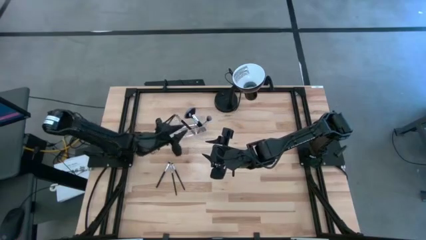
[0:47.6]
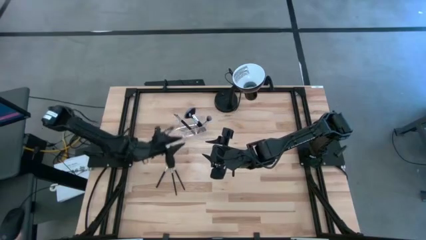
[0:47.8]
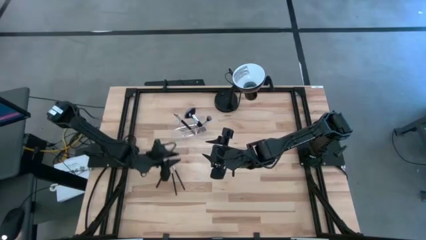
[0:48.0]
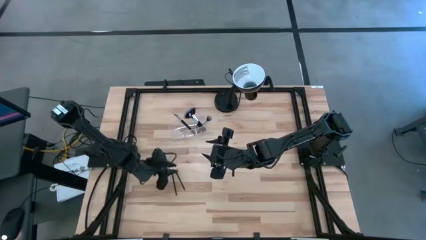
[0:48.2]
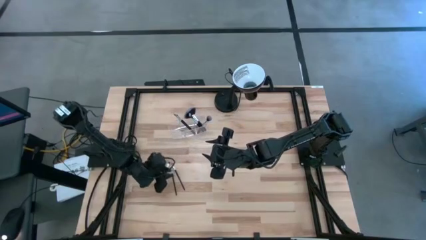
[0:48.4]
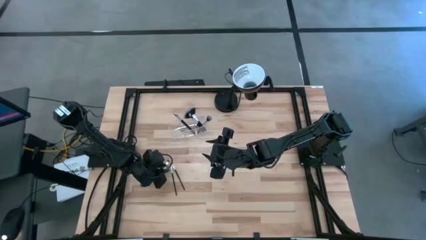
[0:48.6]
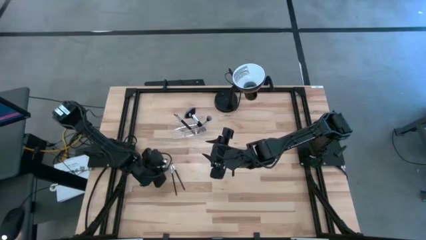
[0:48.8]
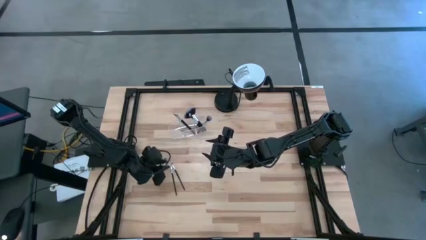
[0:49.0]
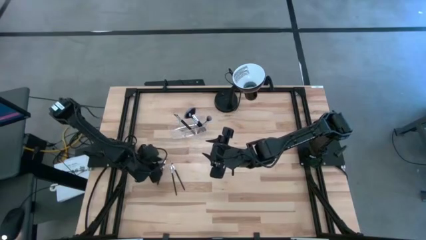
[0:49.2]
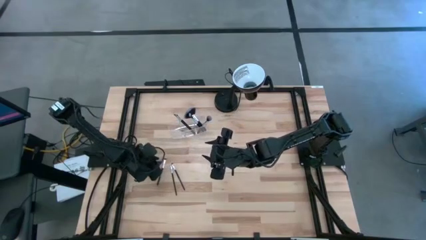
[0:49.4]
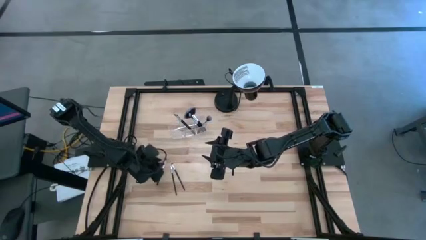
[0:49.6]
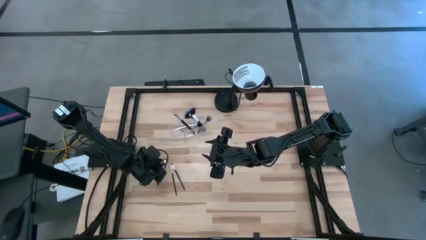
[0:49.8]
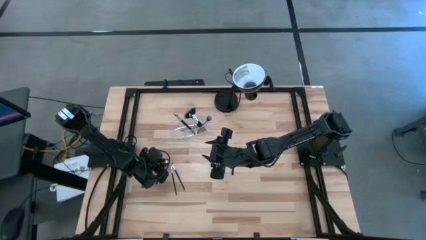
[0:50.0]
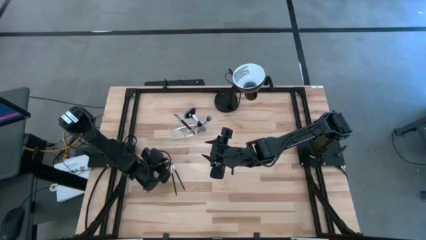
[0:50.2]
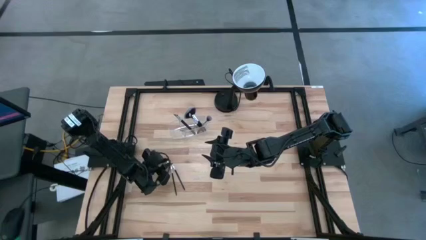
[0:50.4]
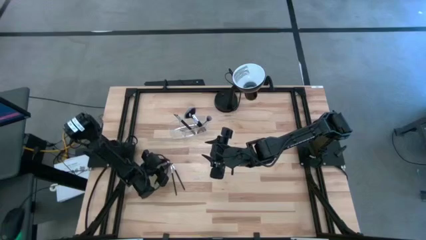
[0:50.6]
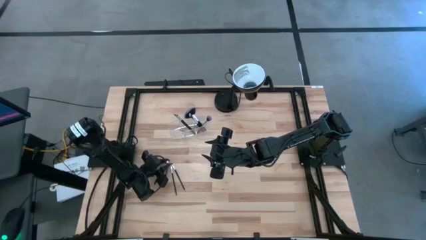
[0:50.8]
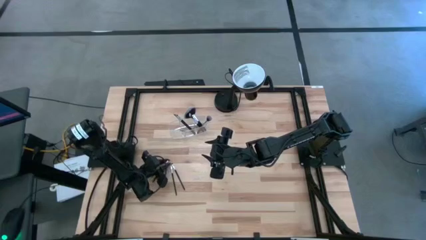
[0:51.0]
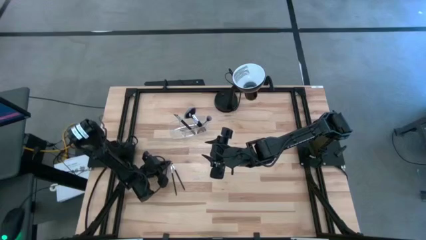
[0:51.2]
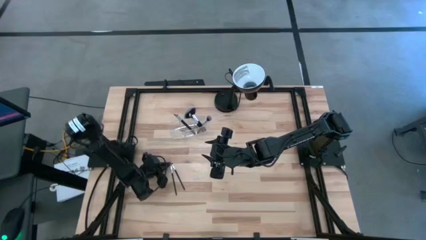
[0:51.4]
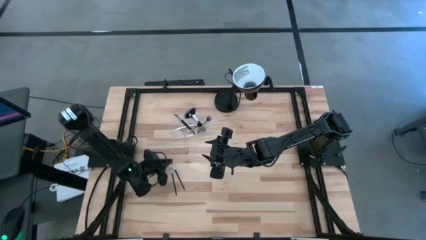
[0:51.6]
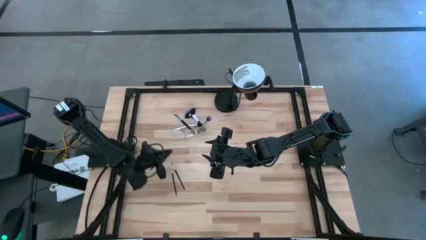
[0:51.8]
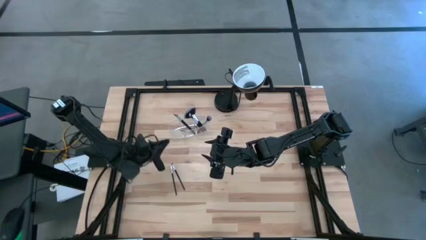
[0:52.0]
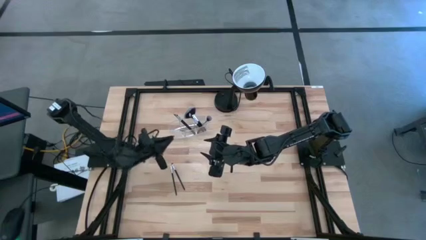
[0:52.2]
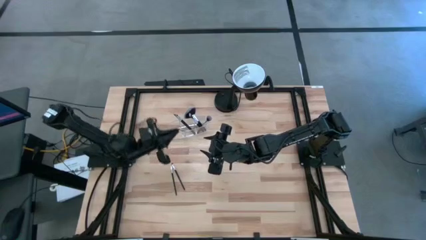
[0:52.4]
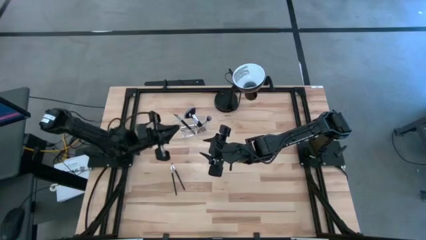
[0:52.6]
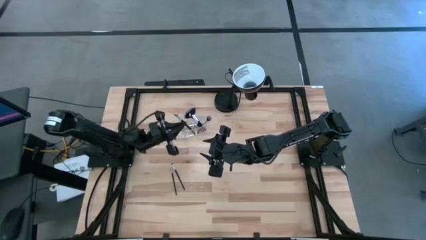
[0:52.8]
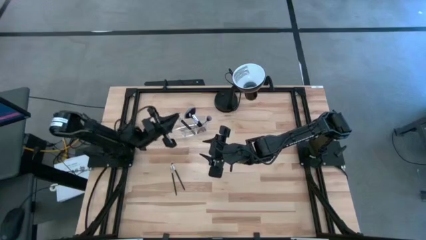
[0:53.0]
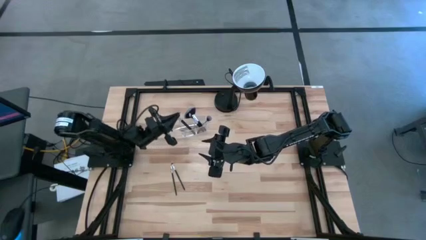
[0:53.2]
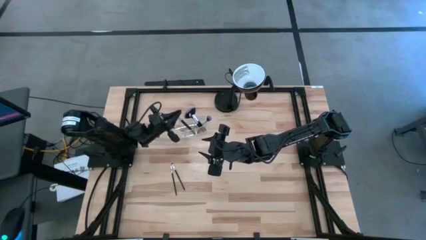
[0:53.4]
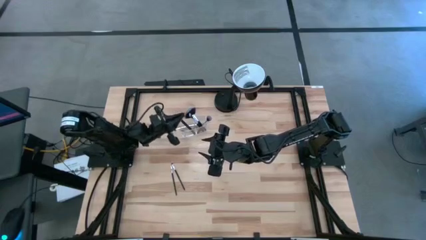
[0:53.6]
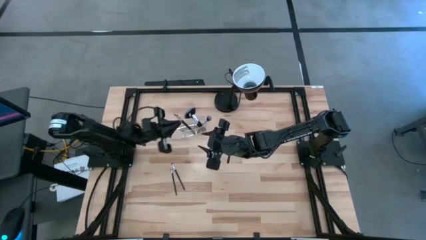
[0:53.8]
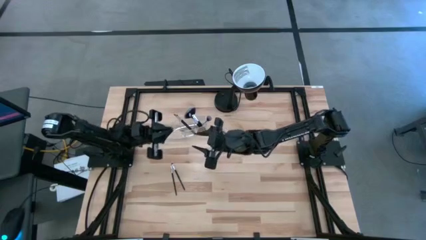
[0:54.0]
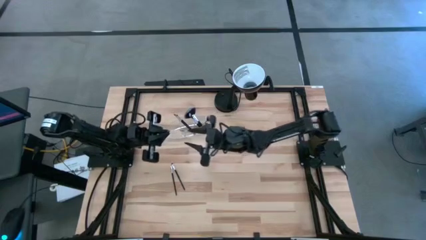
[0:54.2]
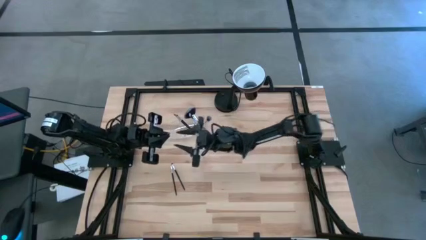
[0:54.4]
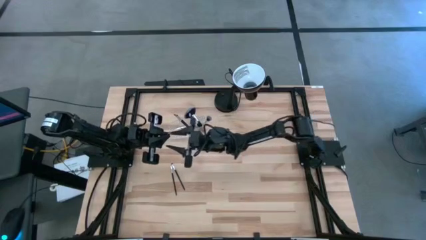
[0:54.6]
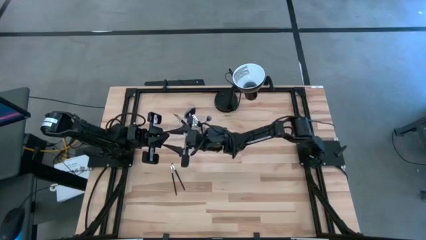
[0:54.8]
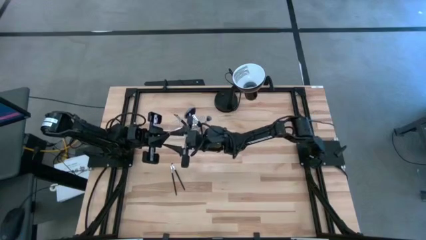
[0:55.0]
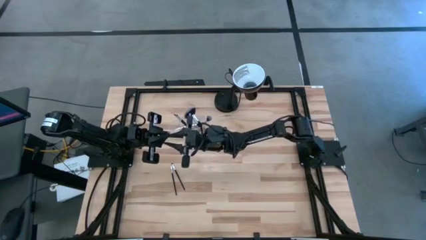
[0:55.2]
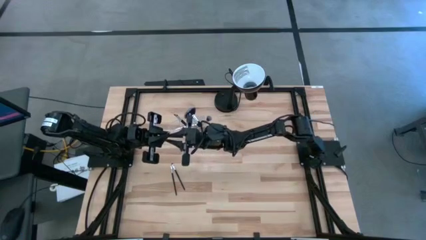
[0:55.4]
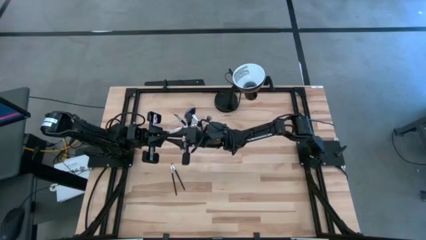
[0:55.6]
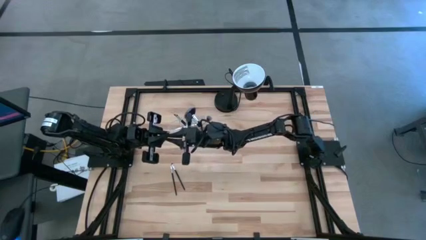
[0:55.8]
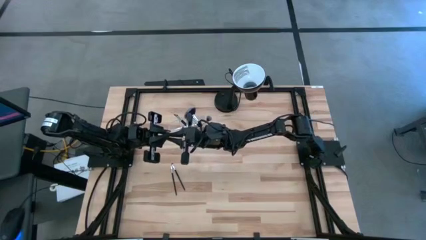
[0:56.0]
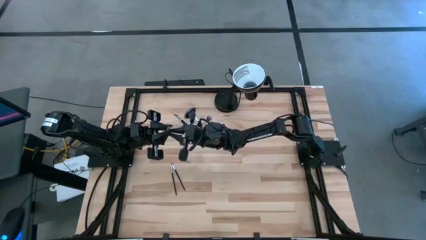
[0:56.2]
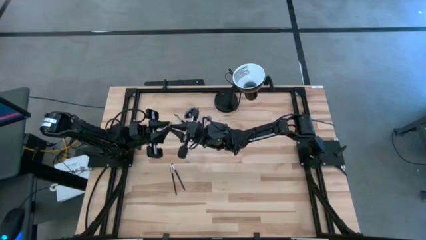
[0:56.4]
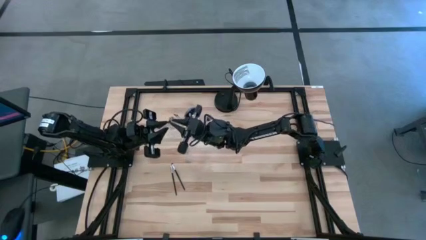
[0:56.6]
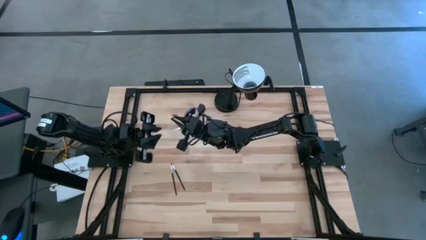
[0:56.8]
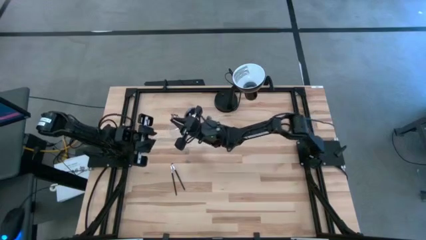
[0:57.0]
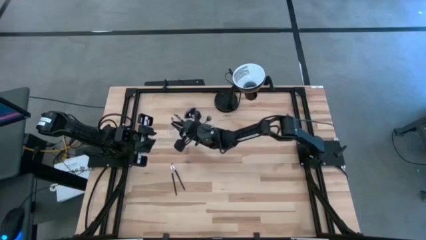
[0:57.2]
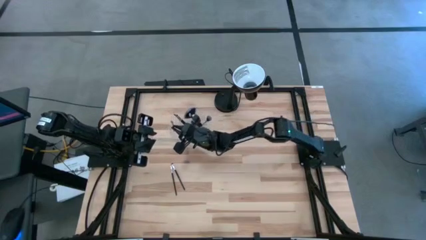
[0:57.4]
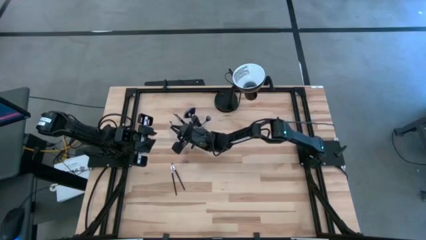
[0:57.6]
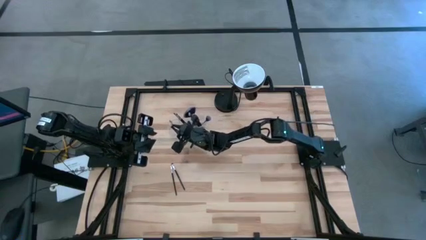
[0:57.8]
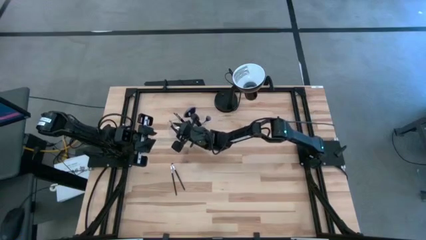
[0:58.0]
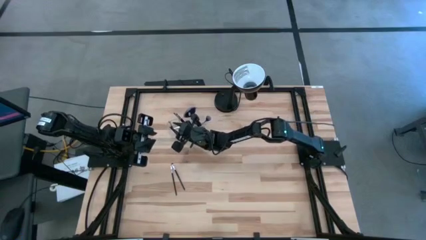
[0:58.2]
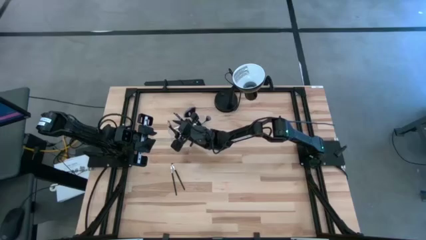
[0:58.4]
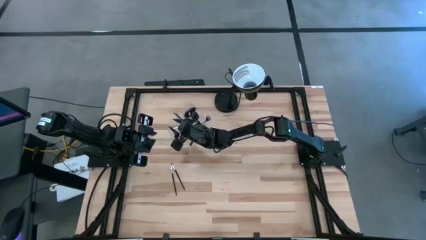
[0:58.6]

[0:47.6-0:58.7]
Task: Put items in baskets/containers
Put the black eyeshadow brush into the transparent organizer

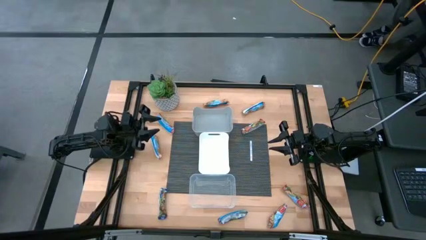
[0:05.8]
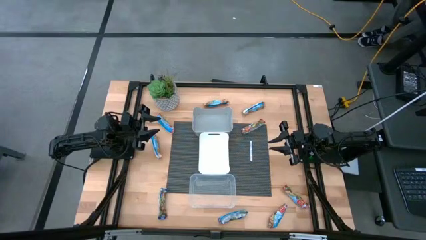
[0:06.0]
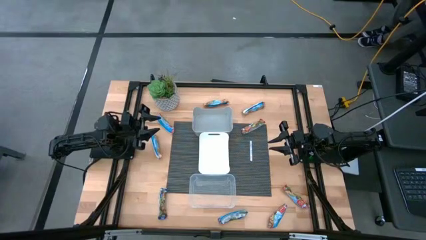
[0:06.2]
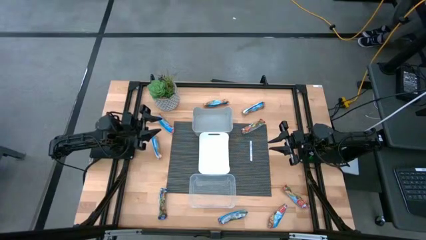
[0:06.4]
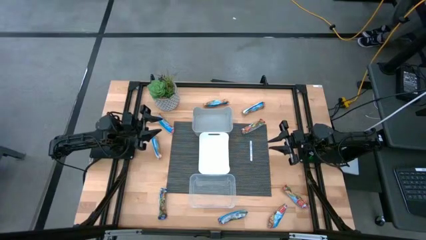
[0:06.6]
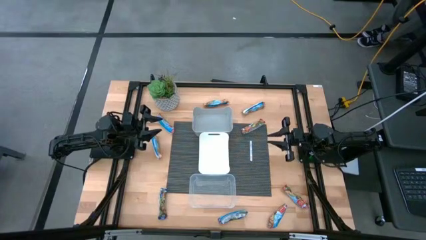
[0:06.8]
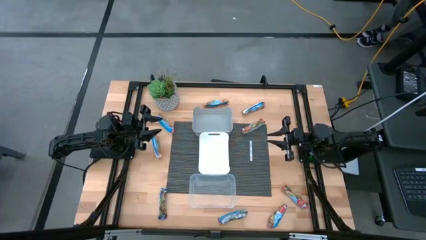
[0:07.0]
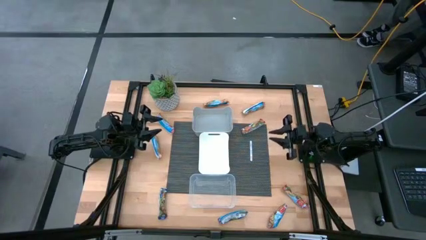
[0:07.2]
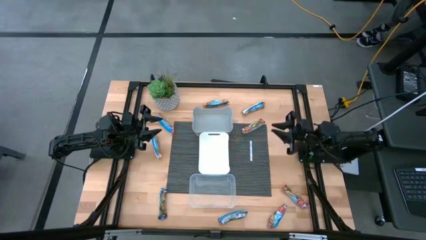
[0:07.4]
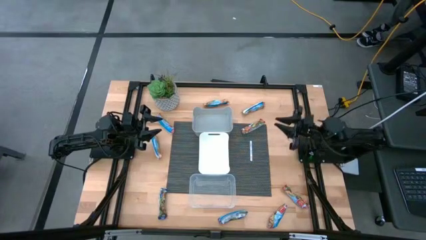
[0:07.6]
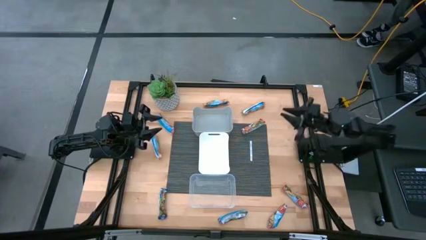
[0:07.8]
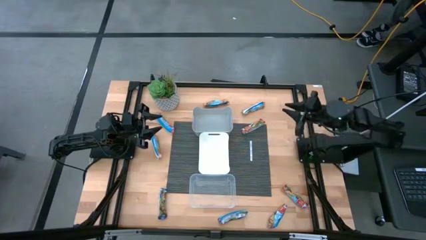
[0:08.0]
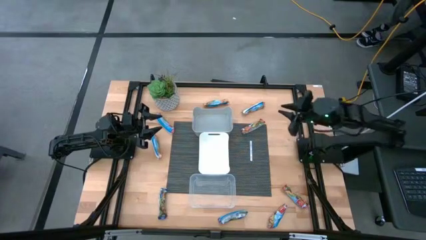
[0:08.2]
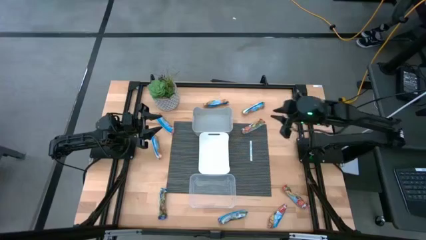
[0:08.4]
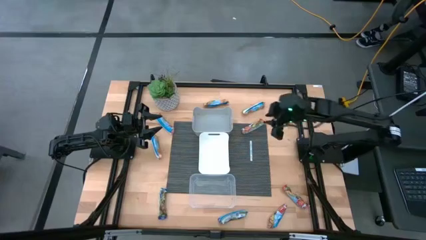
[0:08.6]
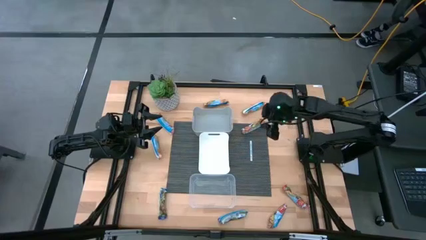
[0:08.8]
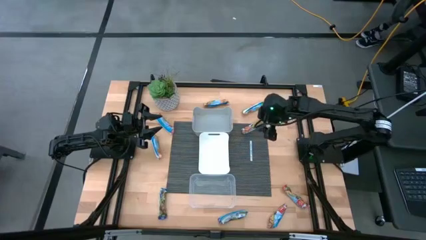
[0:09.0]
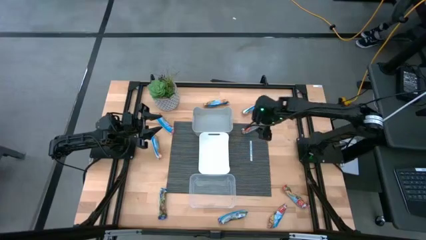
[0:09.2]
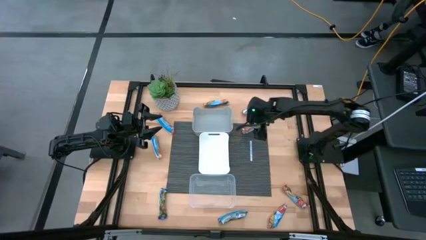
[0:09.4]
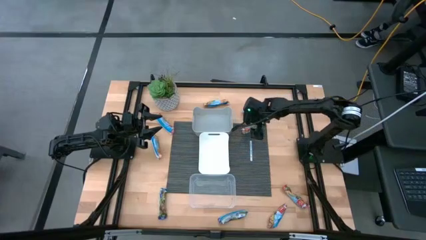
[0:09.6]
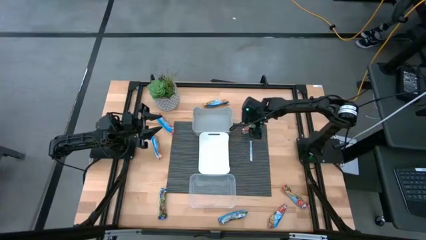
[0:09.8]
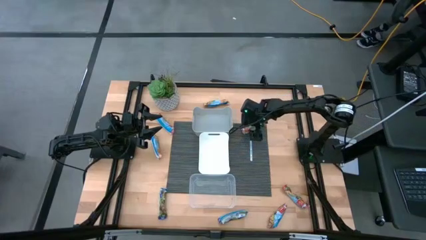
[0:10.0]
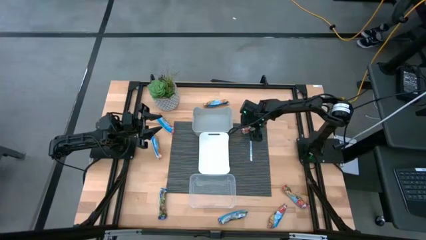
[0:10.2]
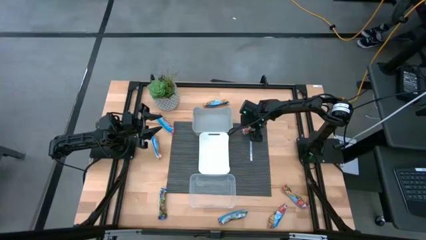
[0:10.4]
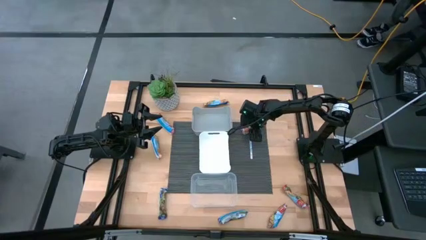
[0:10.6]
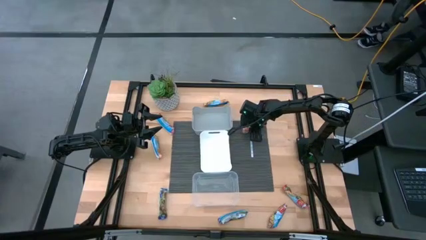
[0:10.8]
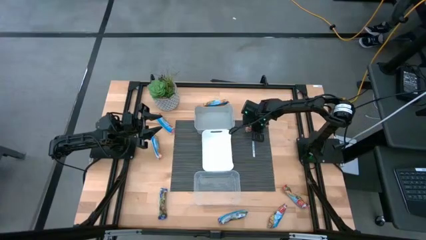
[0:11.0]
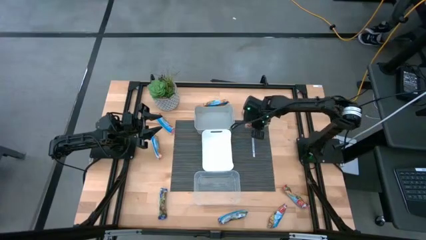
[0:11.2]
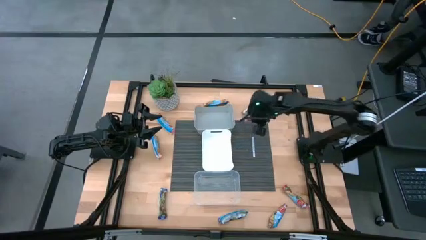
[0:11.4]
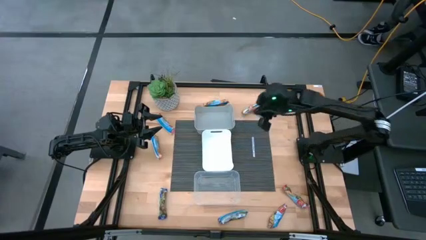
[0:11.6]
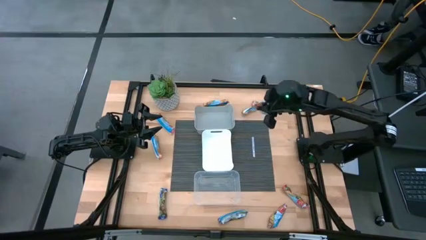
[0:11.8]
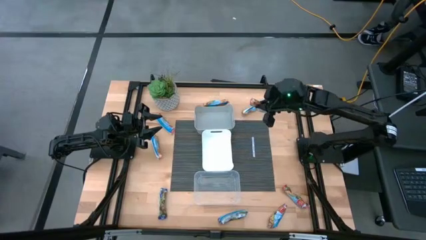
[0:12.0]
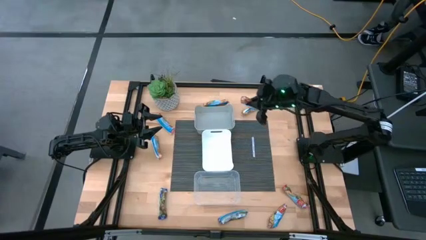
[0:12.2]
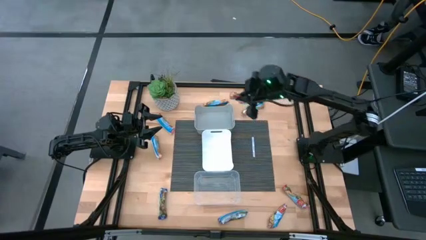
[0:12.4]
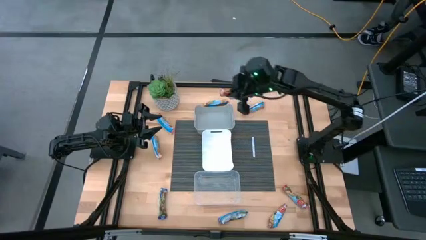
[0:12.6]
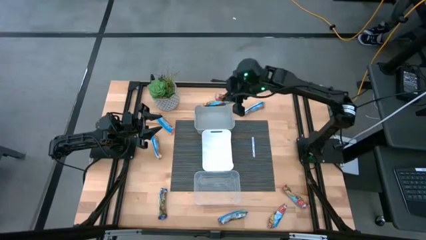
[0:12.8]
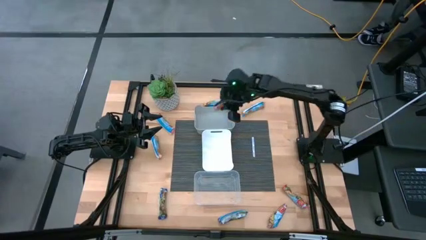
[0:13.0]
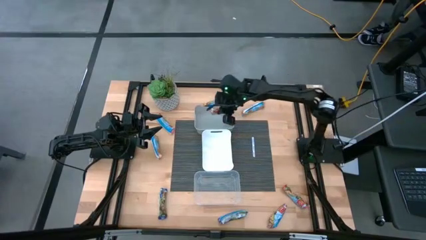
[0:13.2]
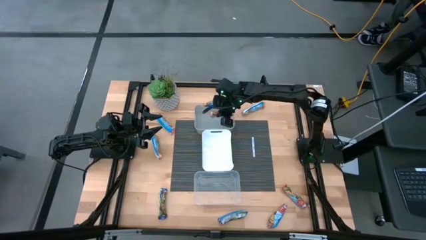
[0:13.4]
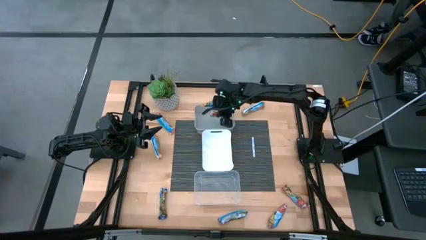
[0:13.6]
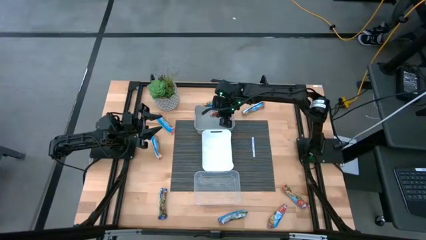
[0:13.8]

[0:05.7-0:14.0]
Task: Pick and place Granola Bars by type
Put the top right red granola bar into the gray bin
